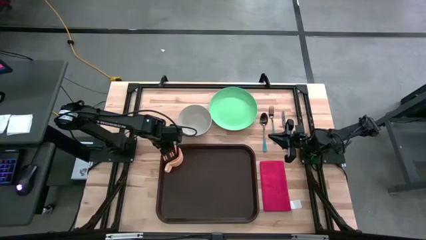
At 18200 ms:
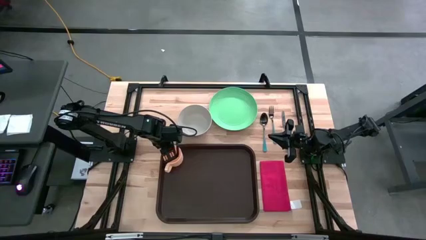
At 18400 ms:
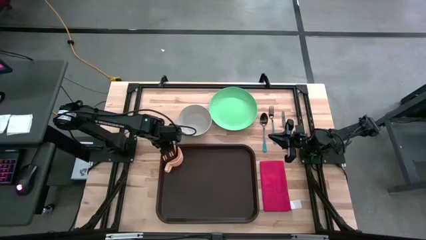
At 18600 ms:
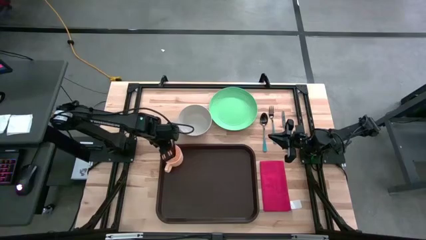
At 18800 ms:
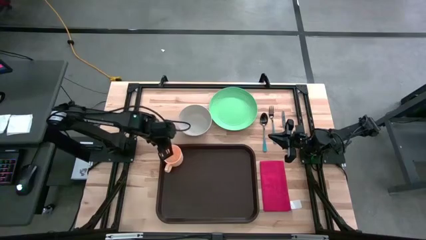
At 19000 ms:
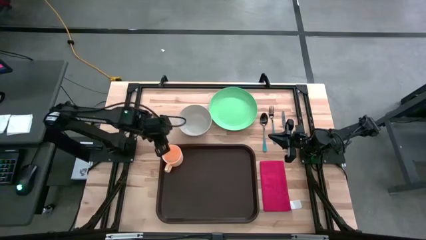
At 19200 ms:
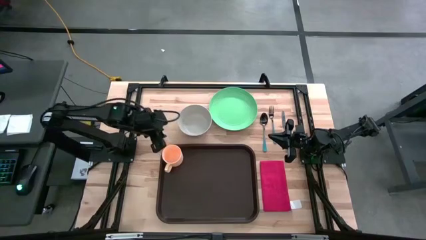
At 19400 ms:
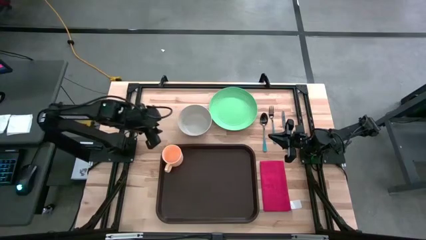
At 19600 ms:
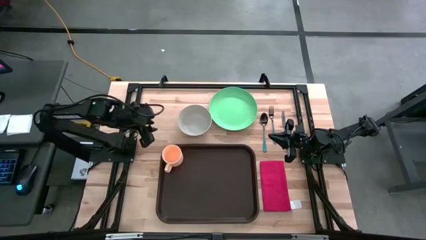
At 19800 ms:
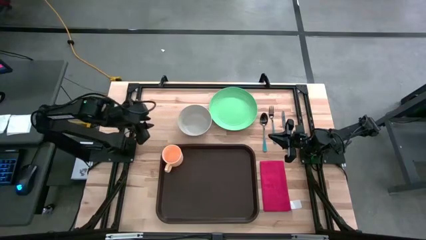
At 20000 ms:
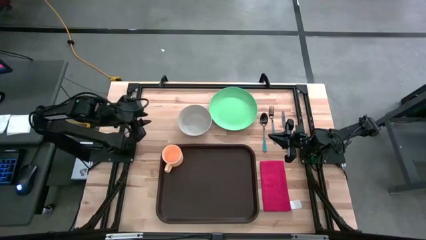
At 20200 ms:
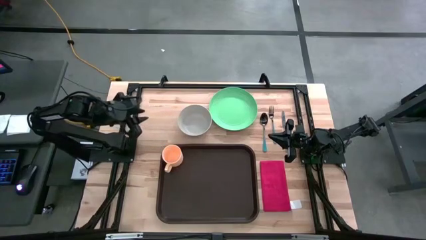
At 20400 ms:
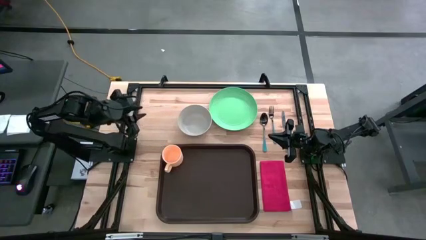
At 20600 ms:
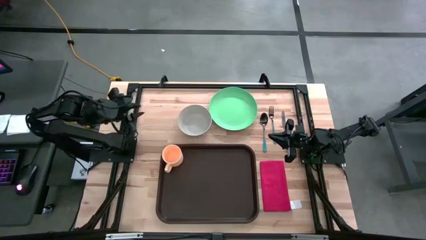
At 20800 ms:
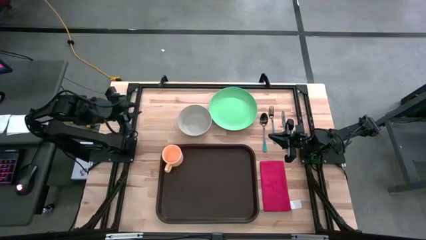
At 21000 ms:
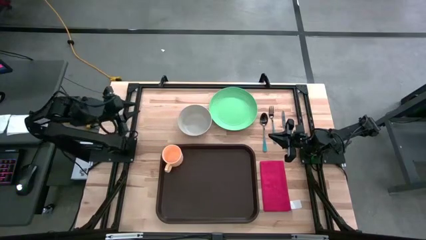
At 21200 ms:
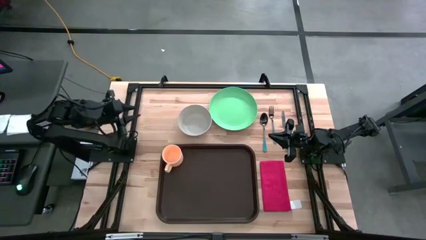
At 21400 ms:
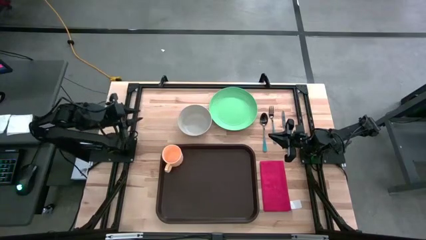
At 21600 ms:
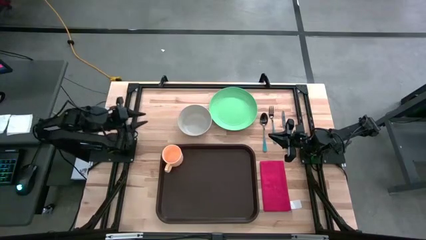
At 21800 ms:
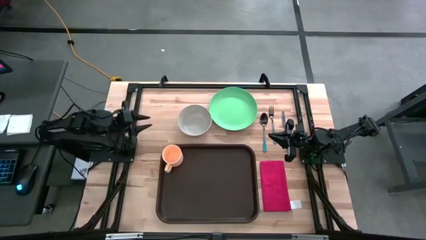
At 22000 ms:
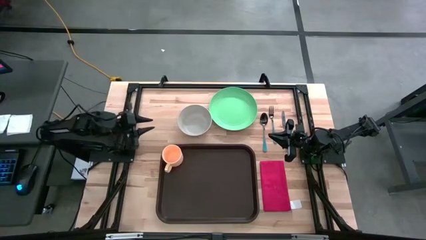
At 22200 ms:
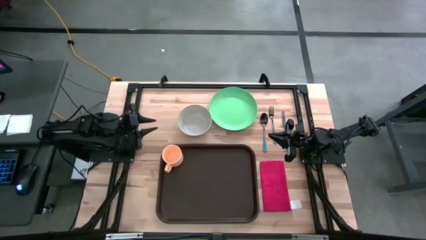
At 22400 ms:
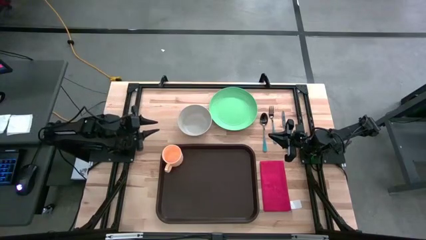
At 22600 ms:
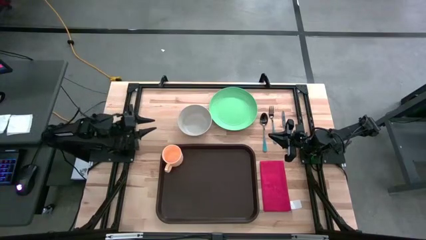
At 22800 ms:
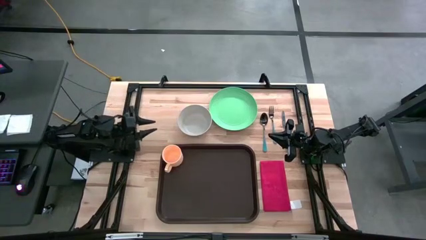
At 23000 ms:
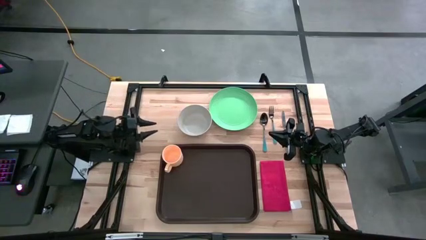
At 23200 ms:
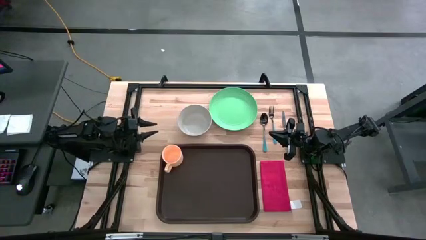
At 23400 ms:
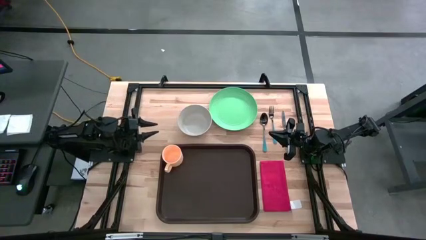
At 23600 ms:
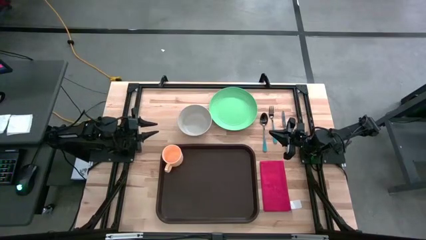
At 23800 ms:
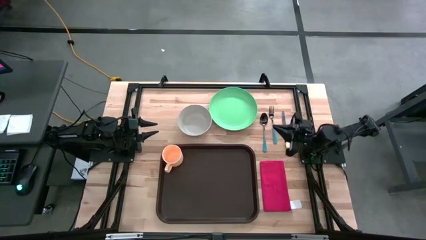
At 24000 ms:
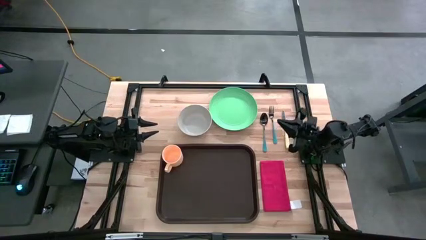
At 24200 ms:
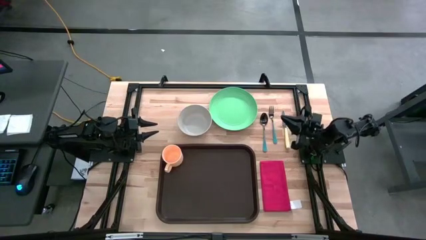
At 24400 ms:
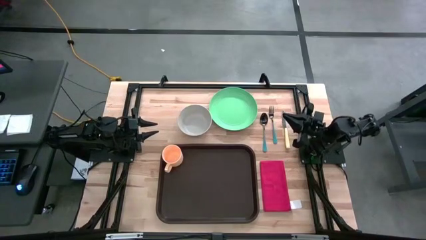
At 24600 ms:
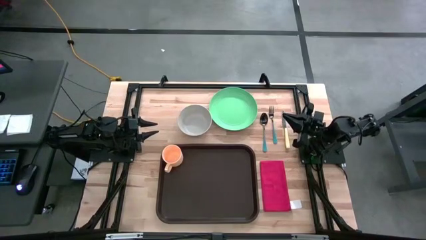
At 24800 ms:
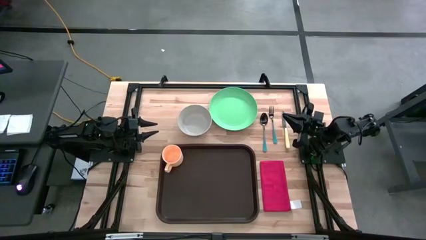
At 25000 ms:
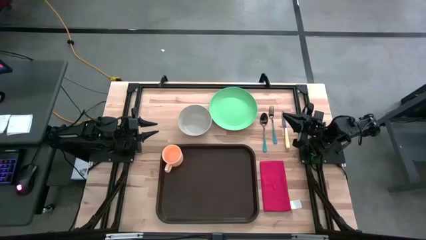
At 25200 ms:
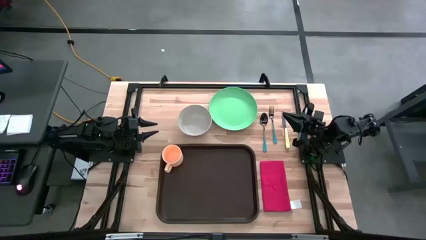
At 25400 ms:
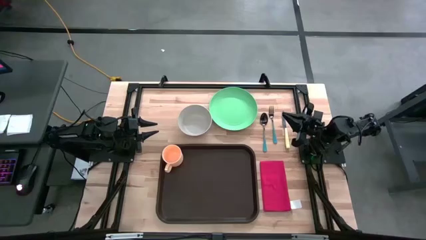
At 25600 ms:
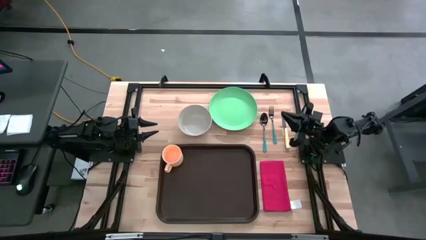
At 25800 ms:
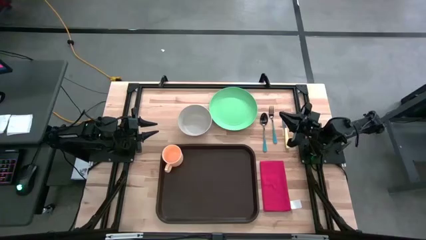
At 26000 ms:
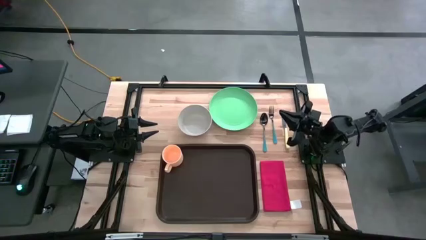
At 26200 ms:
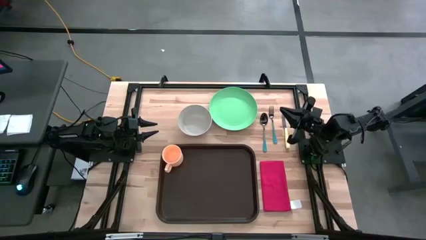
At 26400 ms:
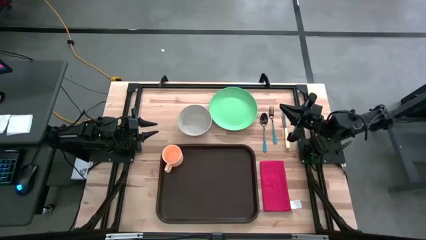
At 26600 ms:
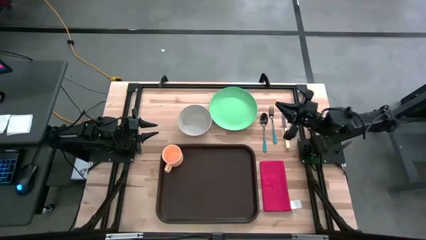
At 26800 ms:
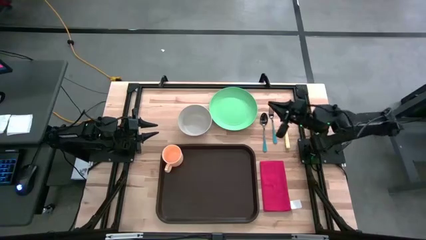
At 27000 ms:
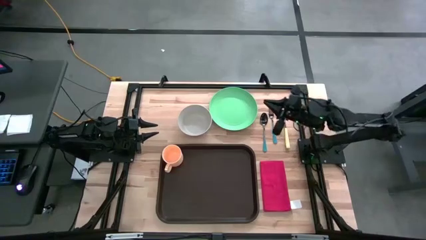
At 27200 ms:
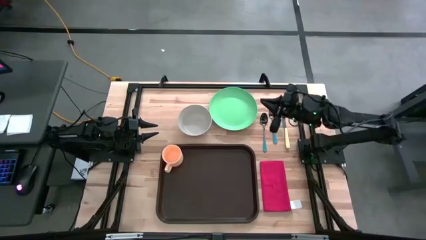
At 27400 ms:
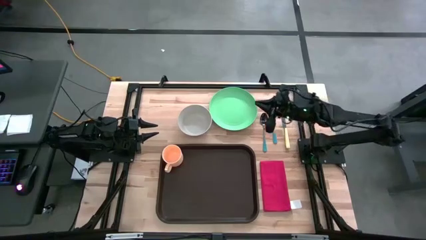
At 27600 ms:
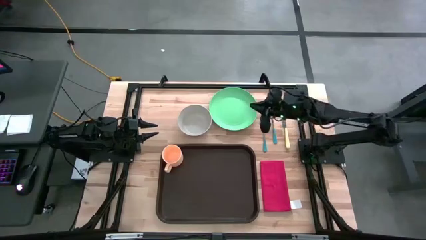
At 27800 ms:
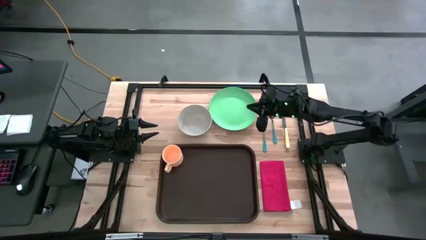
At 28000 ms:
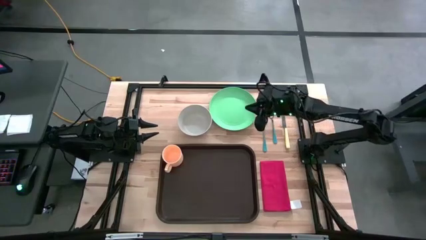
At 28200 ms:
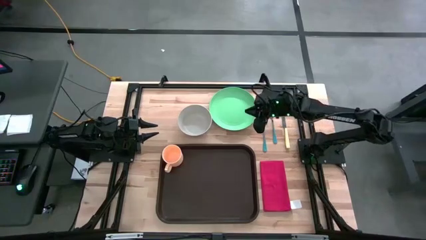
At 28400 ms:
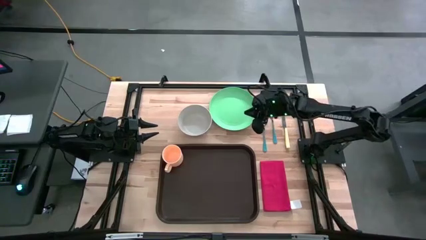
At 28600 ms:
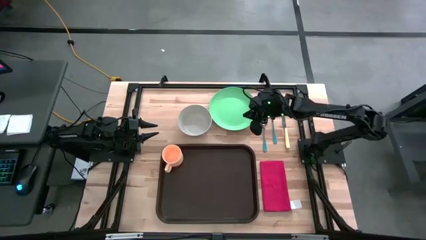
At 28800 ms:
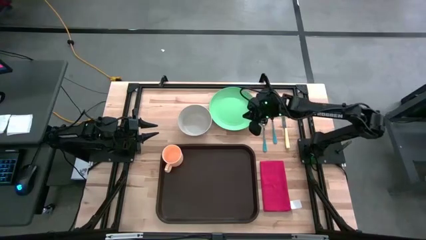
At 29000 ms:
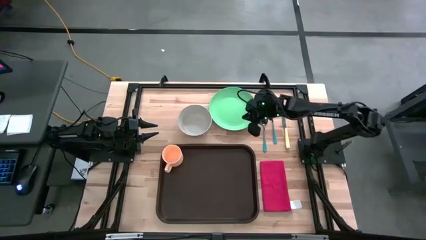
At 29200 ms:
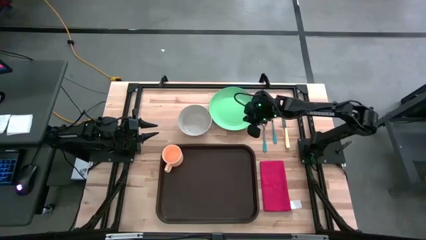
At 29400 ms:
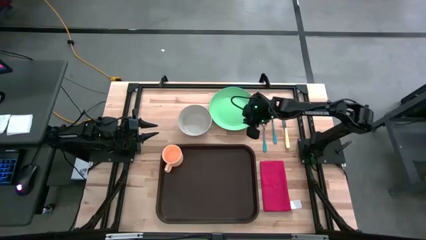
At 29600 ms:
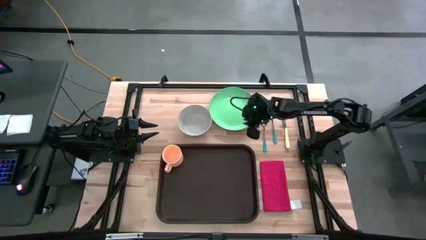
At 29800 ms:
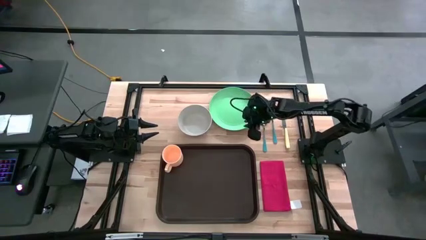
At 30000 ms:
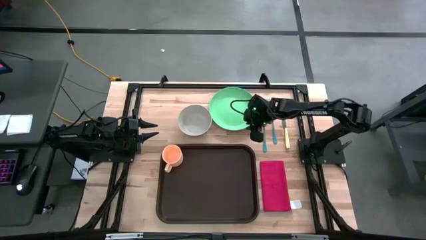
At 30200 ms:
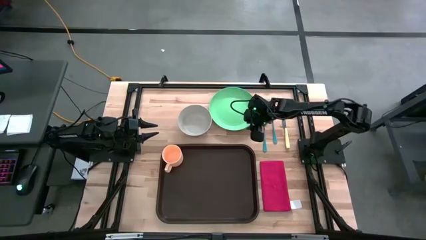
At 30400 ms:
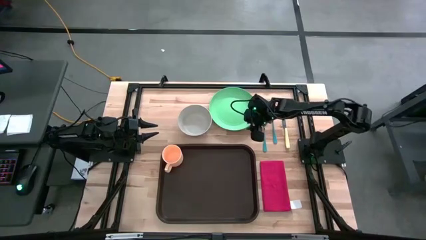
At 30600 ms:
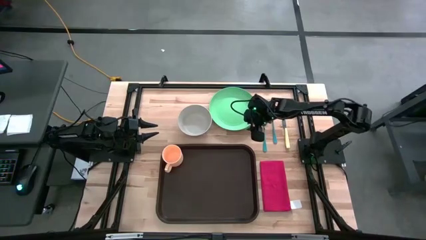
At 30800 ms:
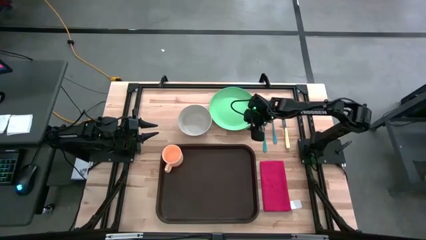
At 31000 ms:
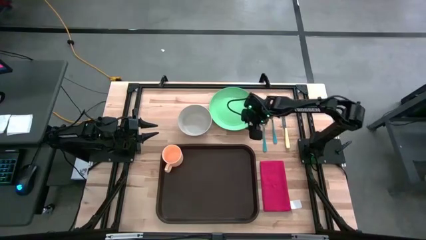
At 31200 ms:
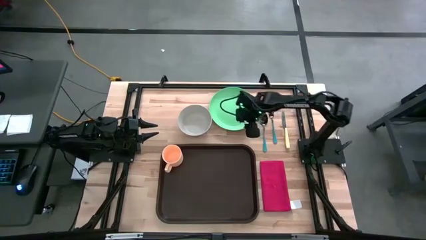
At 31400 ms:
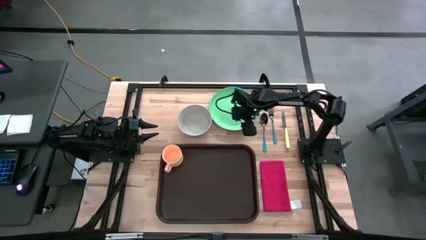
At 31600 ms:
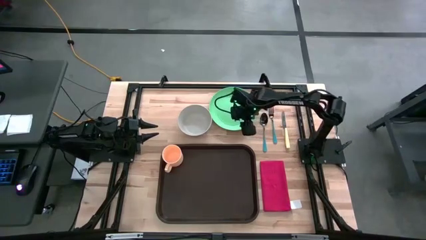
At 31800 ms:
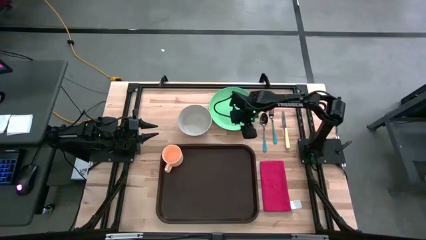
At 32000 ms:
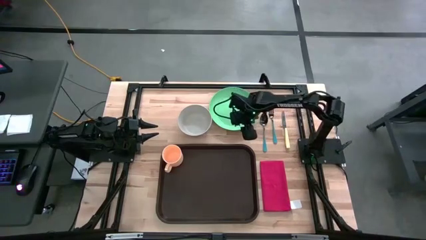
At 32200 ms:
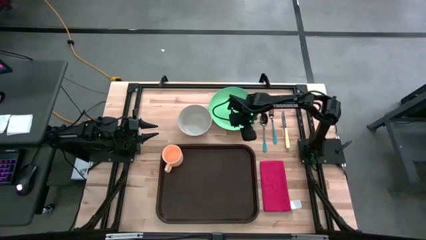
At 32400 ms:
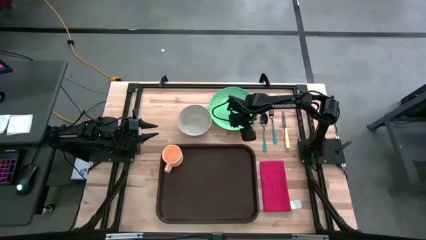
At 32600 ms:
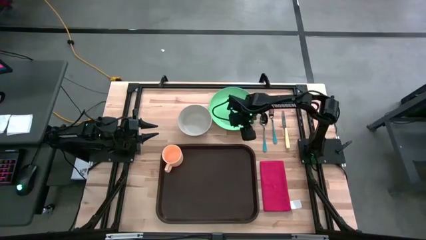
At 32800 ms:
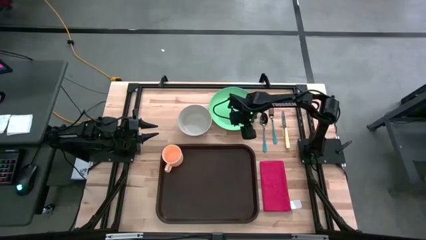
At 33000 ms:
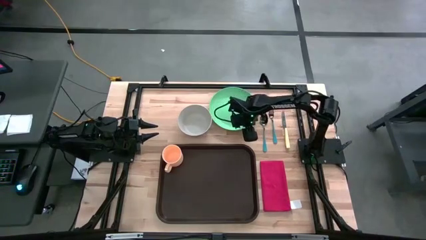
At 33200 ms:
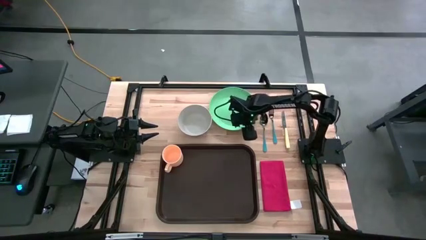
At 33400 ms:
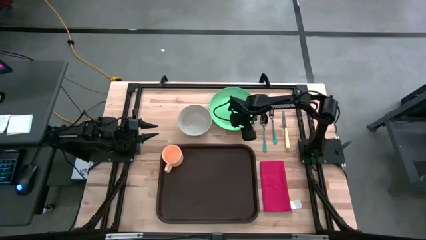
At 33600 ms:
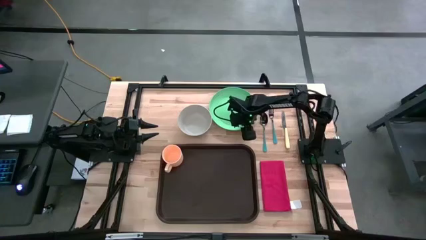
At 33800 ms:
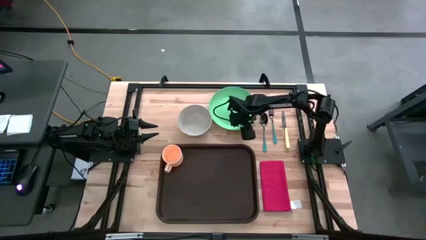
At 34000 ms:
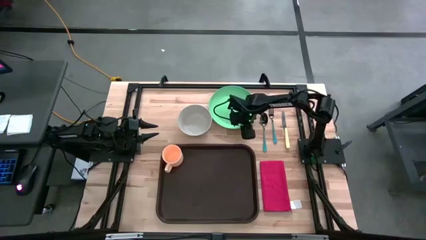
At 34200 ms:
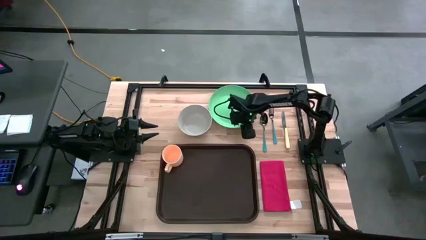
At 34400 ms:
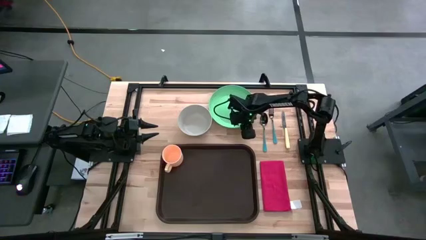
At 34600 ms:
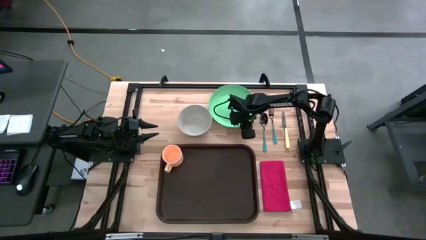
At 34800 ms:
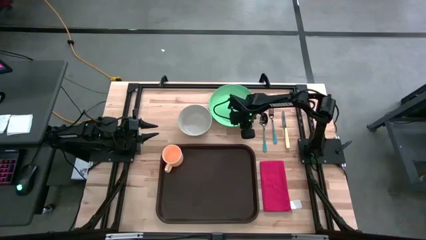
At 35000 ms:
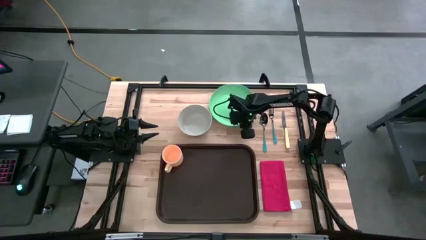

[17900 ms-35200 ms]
Task: Set up tray
Put the green plate to the middle of the orange cup on the serving tray
